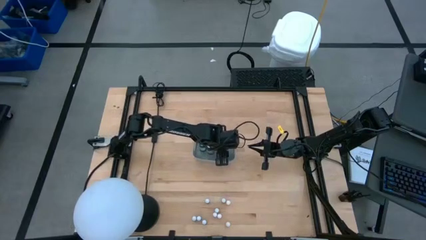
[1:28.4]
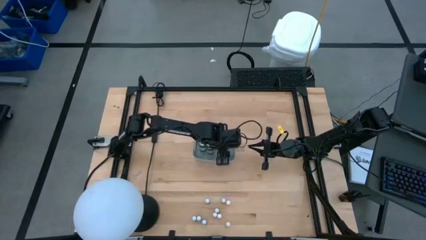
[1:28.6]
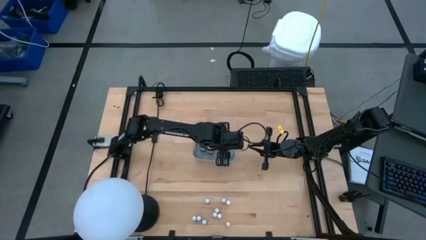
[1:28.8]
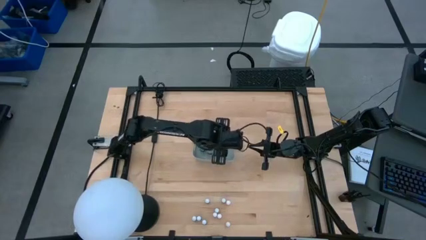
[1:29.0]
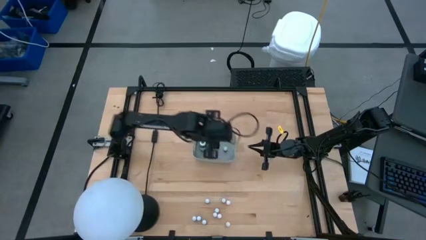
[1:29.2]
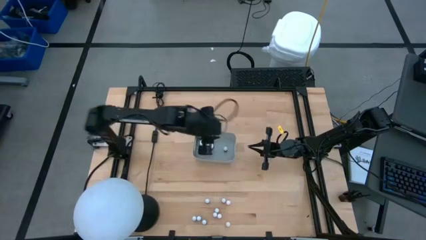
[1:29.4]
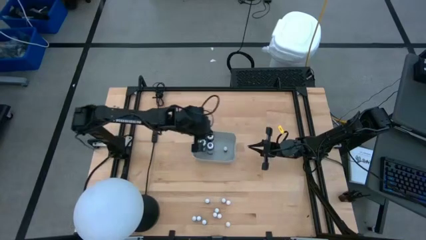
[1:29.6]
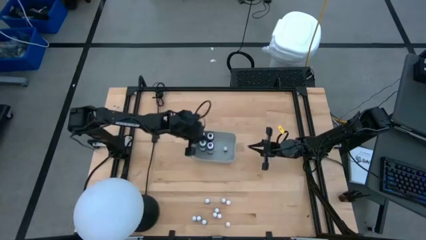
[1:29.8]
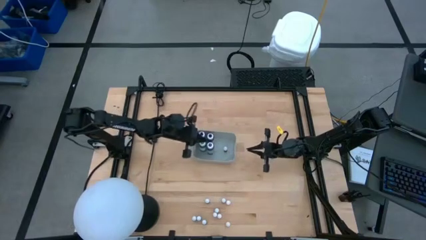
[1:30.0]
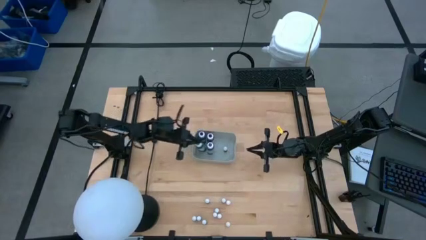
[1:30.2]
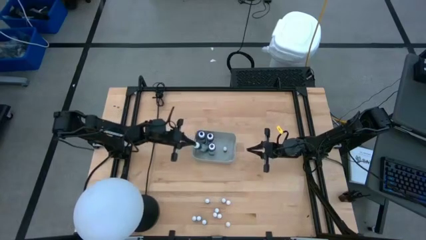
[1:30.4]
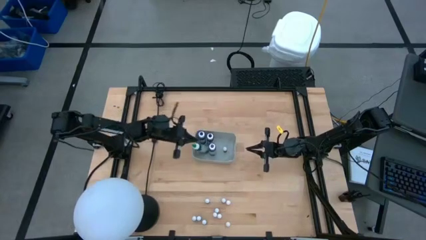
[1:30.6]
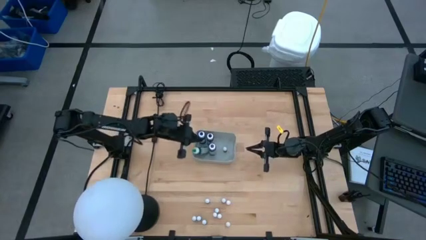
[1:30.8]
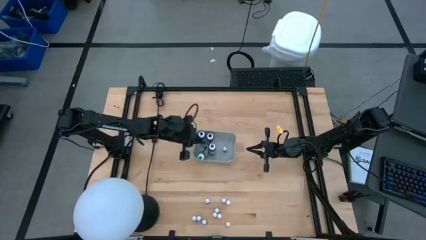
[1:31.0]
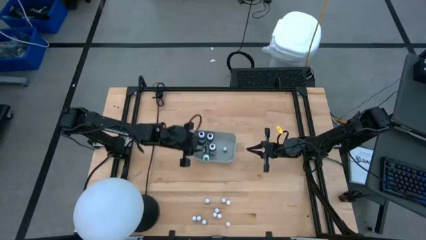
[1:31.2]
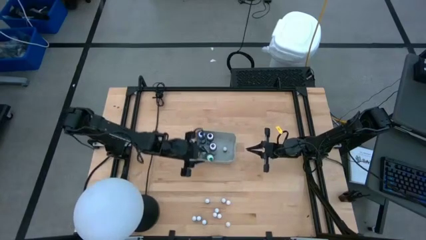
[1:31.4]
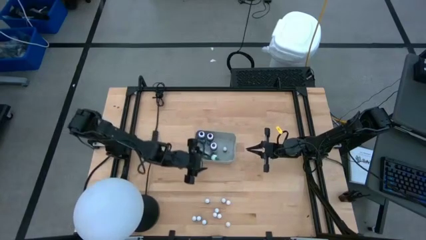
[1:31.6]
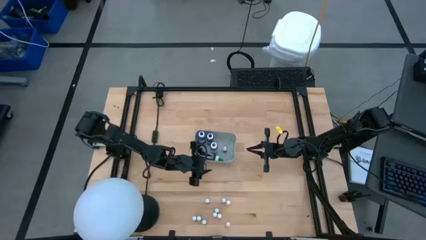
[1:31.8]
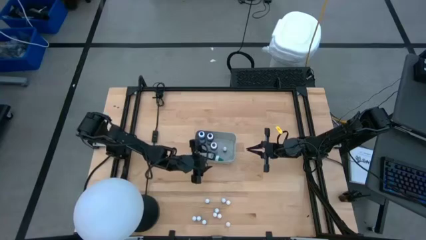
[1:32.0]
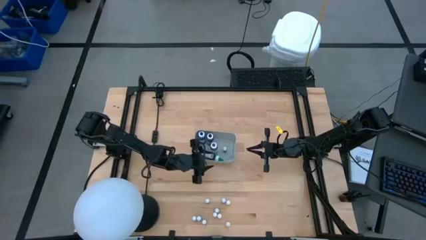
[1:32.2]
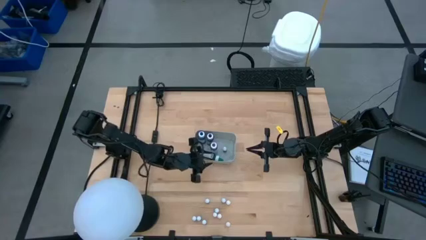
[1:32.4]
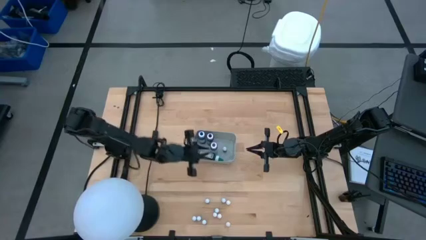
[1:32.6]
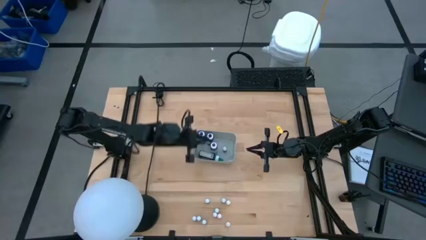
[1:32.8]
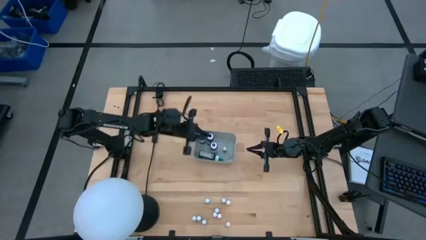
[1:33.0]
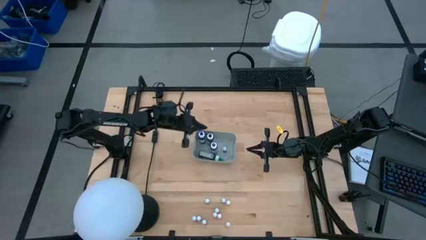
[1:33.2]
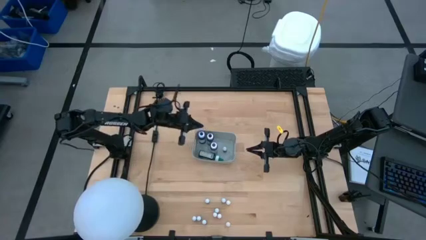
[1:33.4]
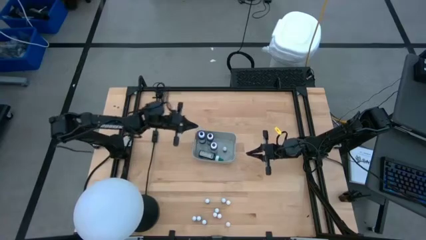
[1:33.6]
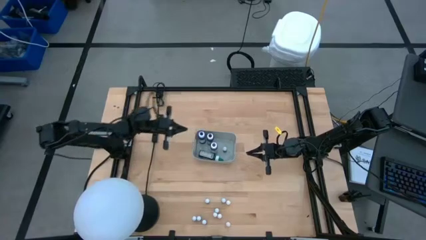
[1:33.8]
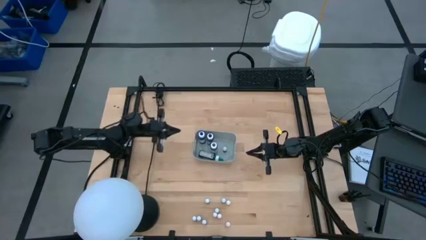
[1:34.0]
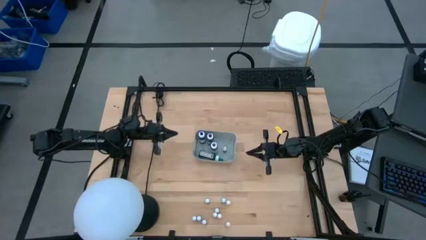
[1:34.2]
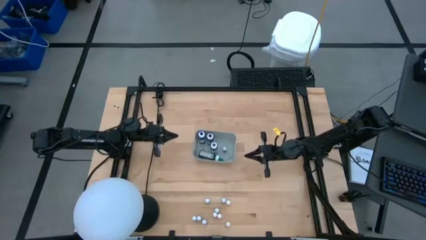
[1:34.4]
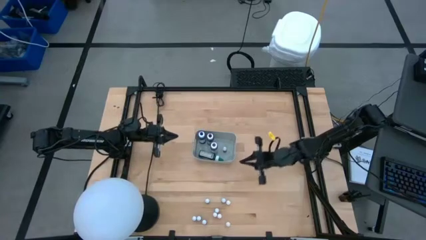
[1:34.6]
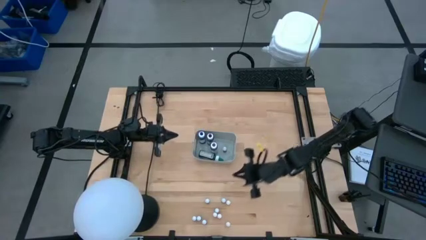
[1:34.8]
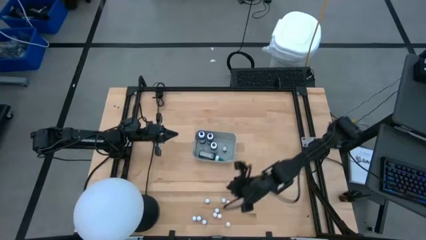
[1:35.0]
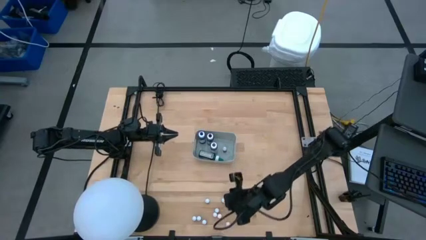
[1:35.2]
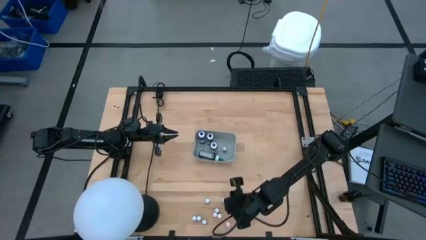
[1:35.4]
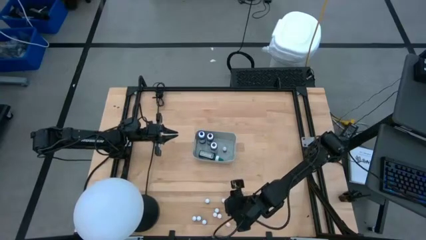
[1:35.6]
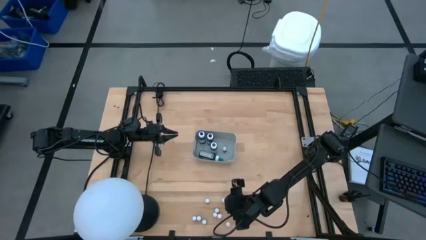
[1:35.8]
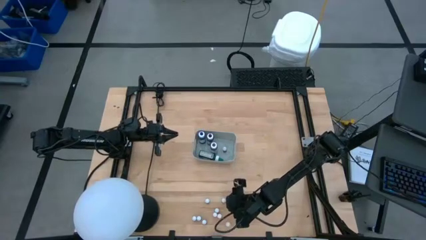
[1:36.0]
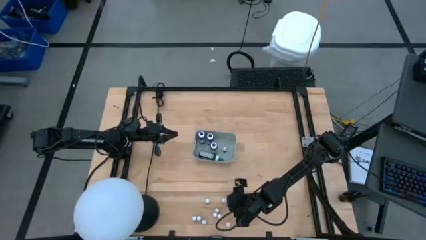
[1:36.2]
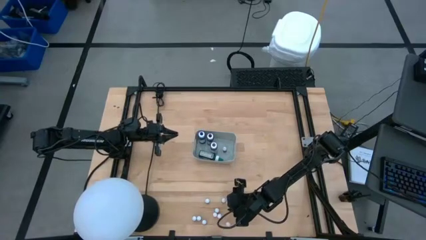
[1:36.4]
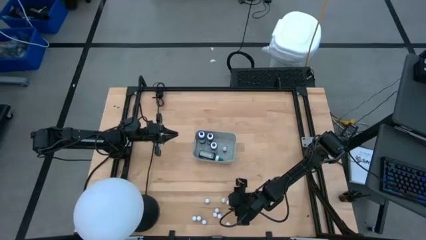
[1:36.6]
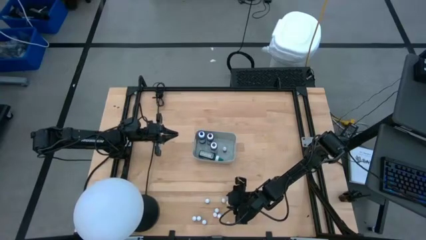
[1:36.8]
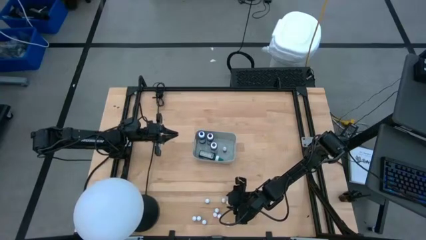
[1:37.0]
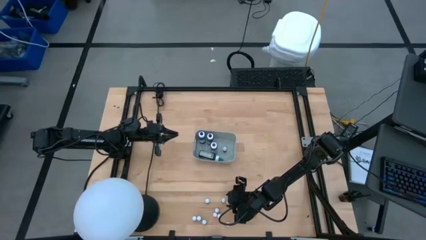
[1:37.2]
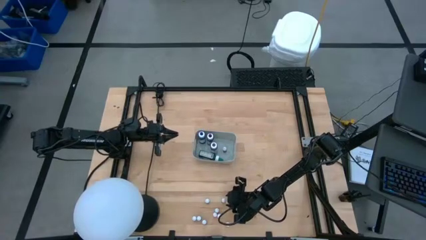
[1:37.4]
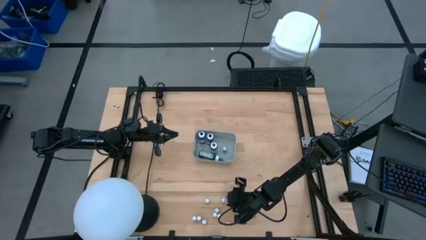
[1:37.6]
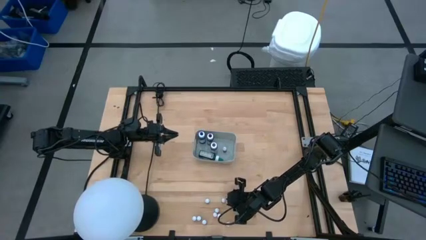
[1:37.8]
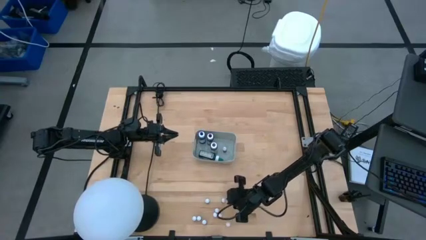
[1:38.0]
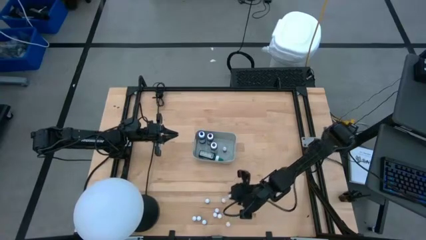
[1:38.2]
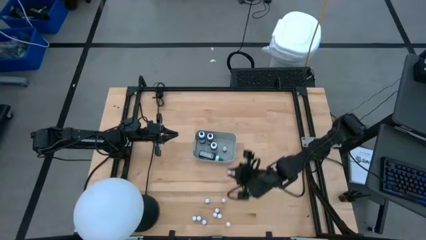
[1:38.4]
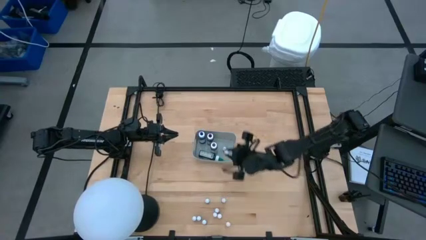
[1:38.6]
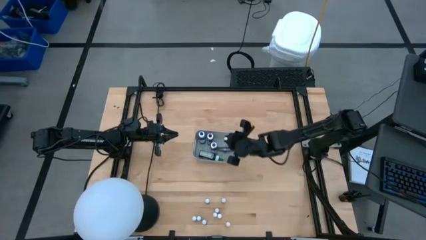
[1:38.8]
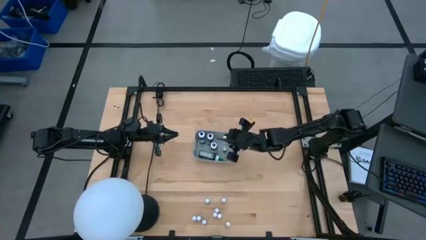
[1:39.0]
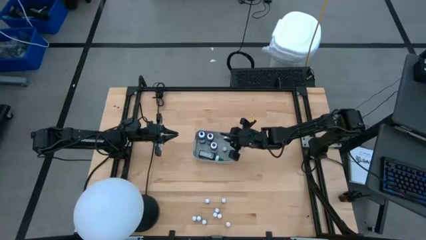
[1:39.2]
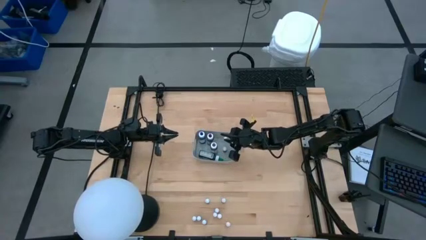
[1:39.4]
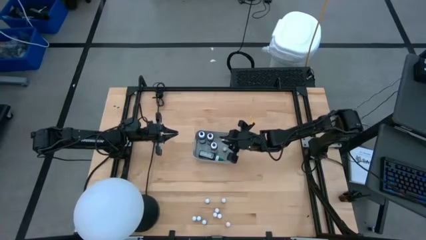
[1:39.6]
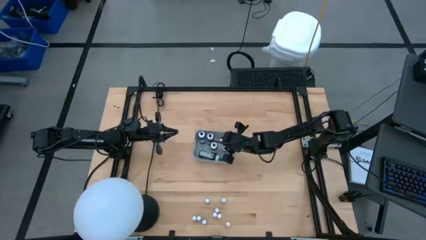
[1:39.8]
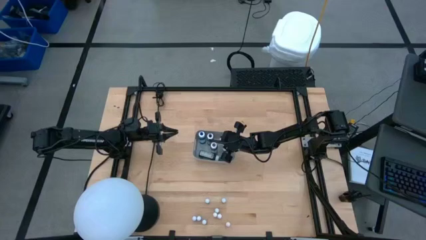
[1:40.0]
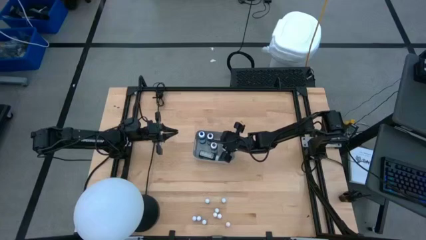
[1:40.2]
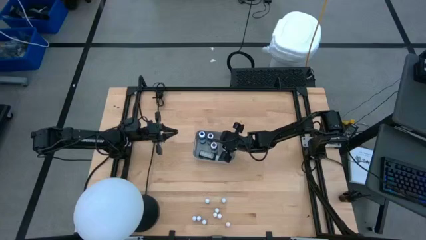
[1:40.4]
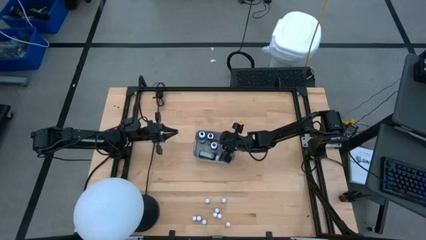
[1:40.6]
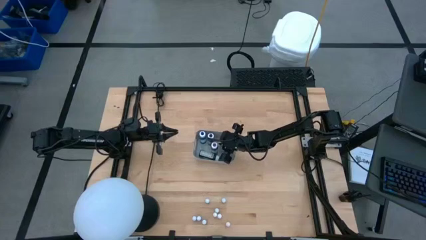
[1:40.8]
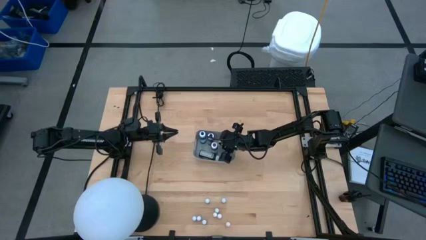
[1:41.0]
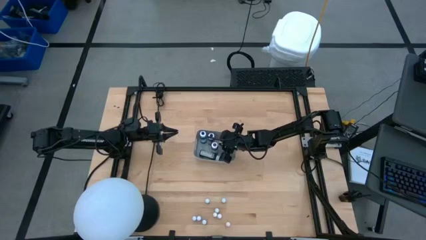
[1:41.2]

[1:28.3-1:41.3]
Task: Pick & Place food coloring
Put the small orange food coloring bottle into the gray bin

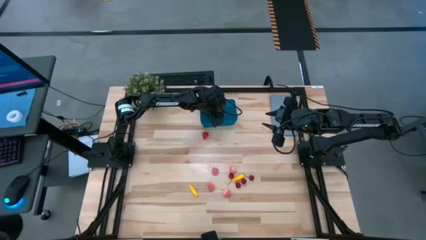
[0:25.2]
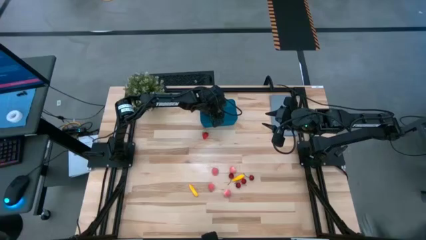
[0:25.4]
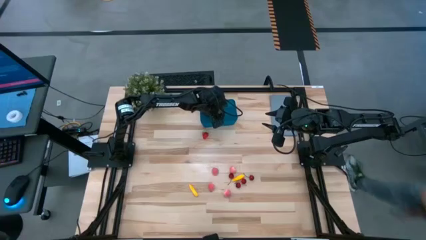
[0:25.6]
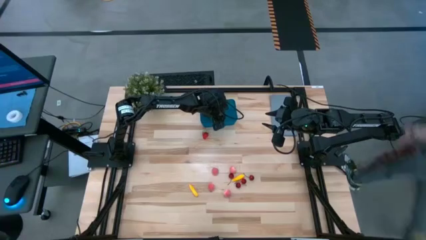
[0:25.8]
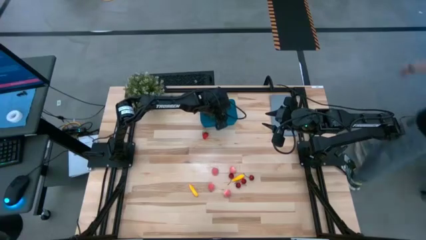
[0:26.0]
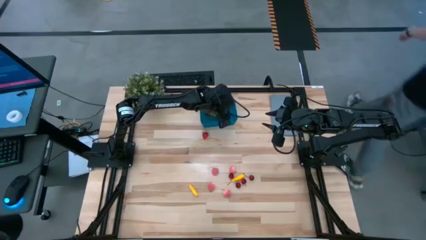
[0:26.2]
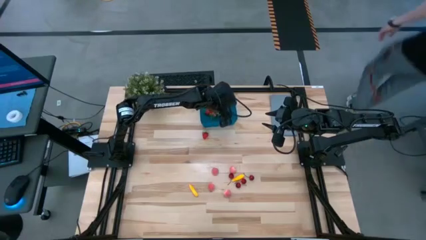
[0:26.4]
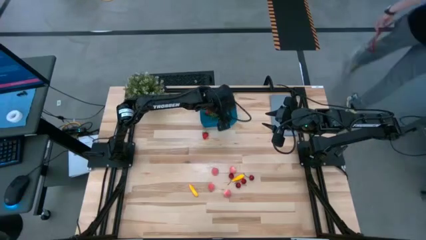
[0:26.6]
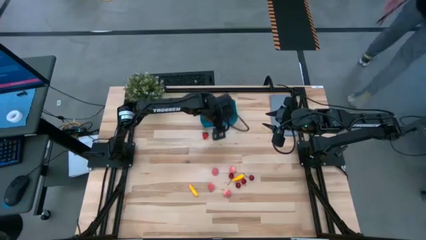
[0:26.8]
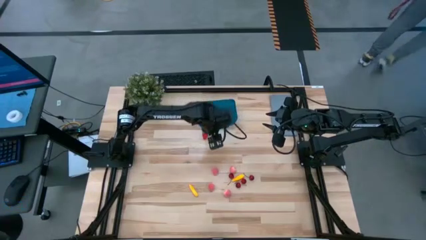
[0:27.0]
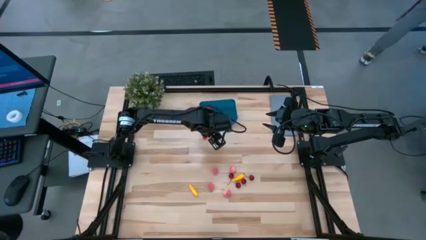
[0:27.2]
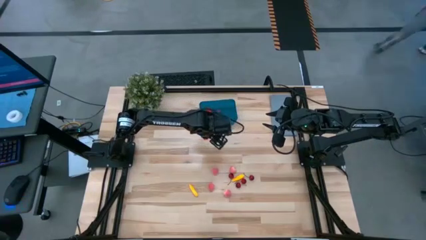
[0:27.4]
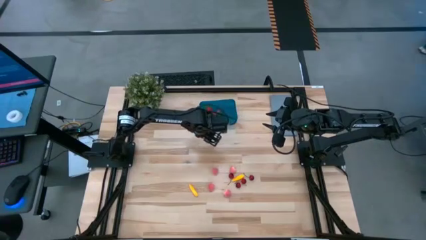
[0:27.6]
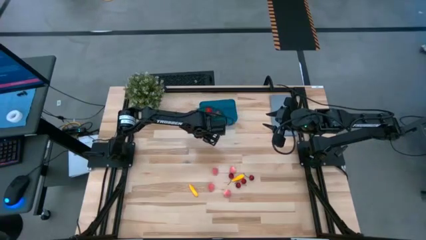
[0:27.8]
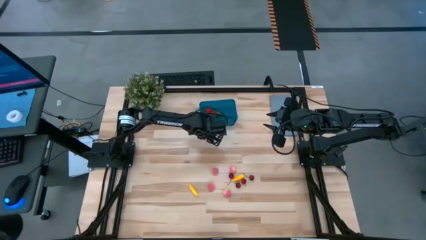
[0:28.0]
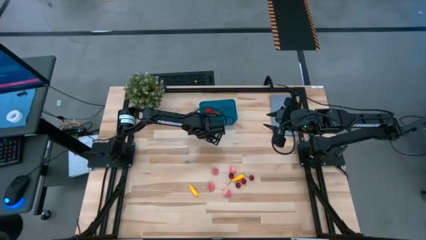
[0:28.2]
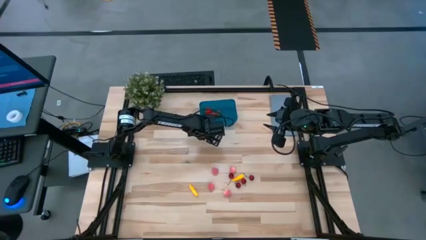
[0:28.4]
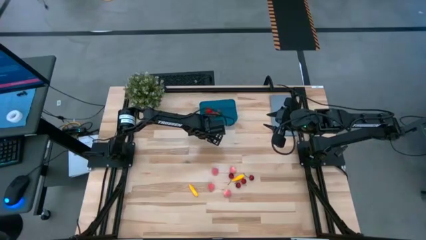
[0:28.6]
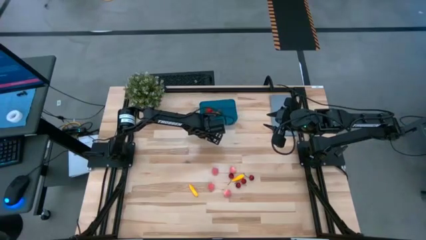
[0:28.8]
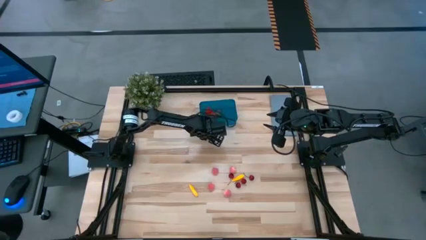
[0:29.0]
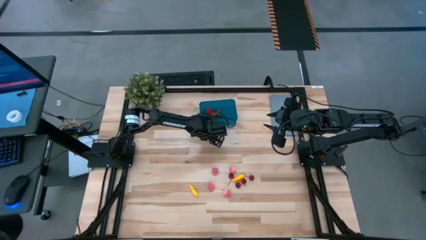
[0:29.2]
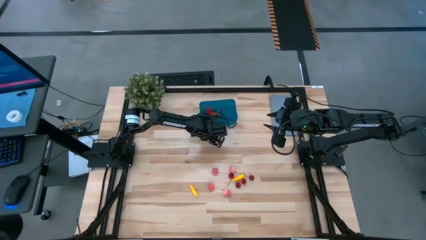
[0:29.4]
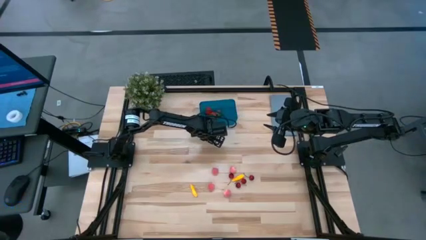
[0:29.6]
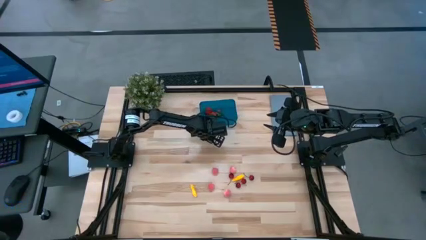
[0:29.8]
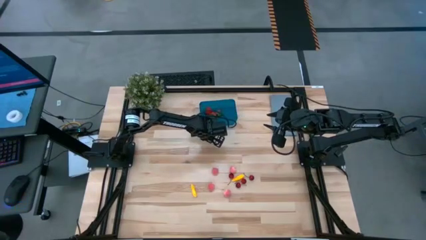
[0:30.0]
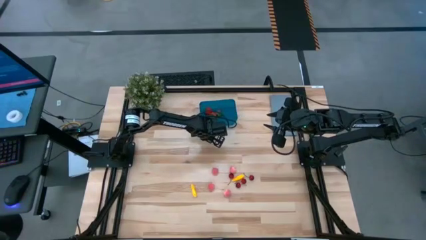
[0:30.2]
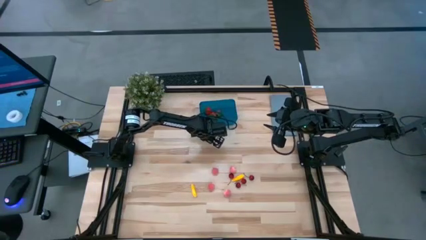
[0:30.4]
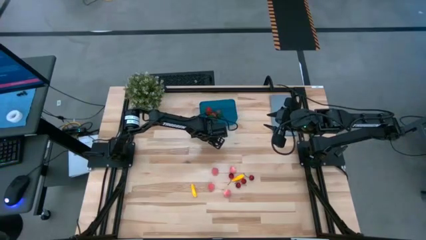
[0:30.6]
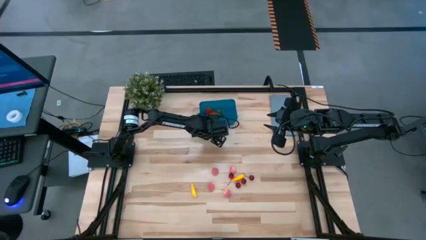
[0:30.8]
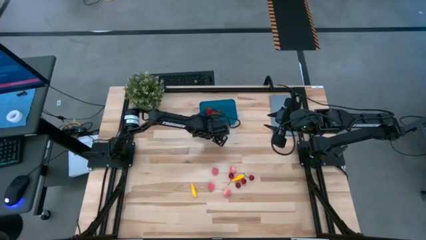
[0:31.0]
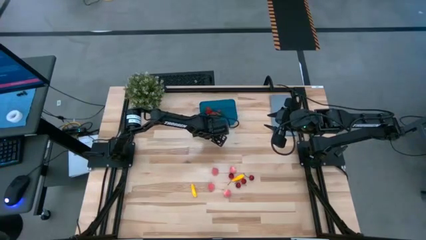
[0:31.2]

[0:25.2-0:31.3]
Task: Pick and placing Produce into tupperware
Put the strawberry into the blue bin
